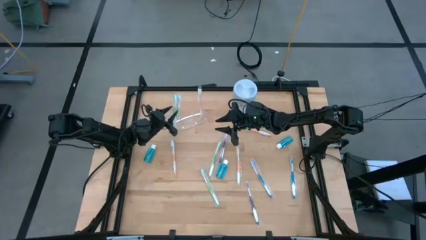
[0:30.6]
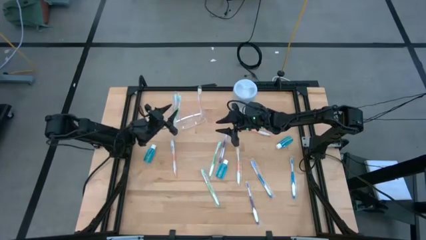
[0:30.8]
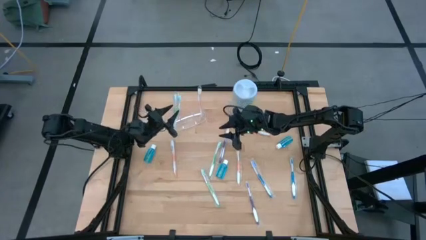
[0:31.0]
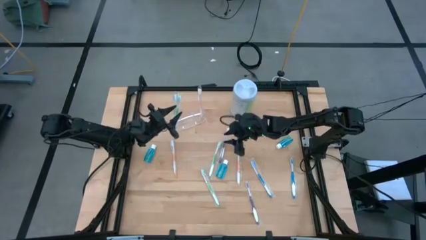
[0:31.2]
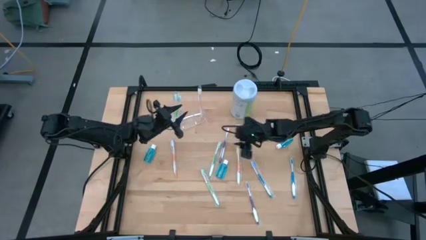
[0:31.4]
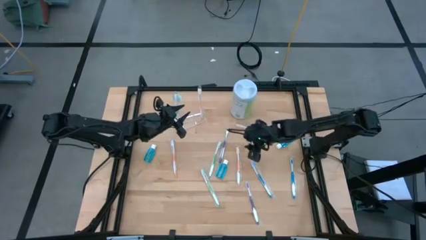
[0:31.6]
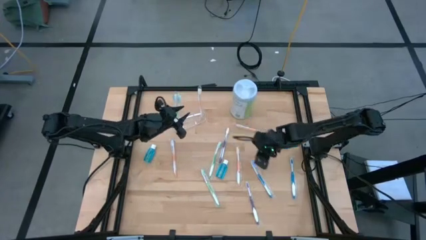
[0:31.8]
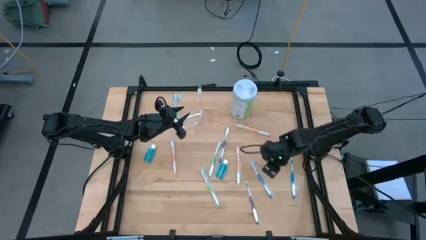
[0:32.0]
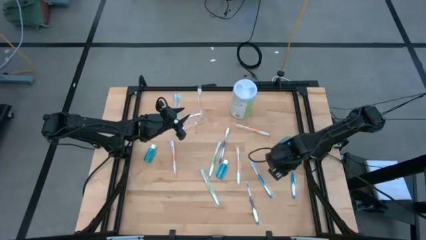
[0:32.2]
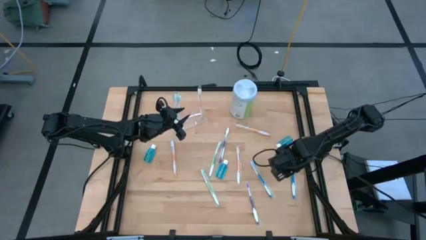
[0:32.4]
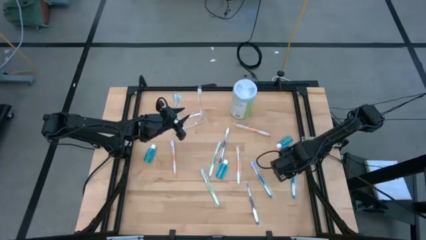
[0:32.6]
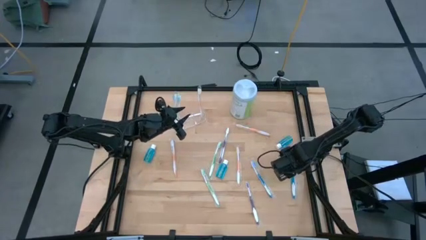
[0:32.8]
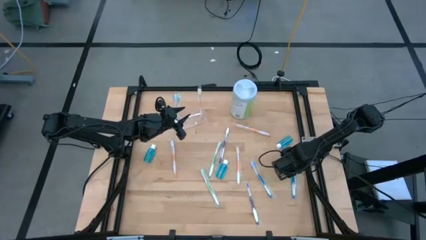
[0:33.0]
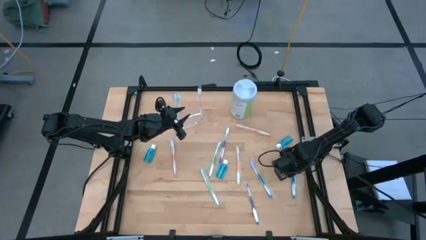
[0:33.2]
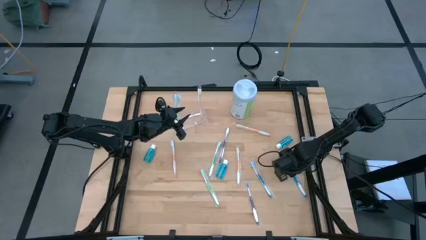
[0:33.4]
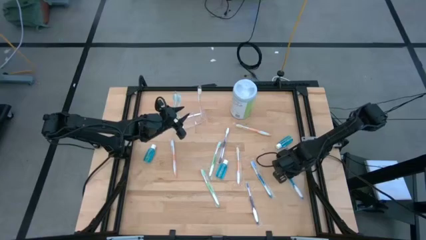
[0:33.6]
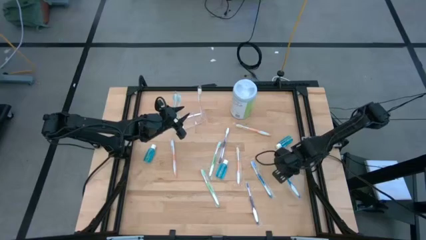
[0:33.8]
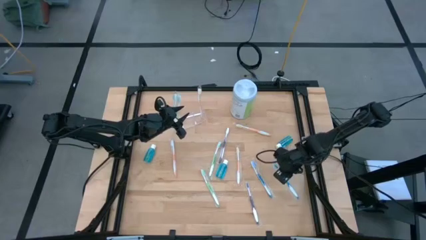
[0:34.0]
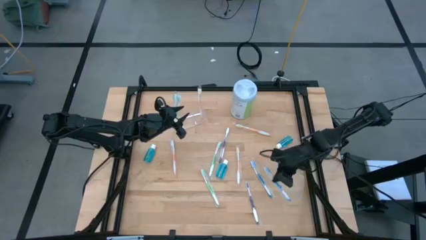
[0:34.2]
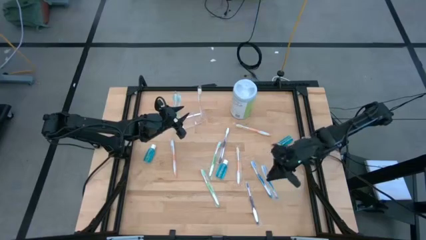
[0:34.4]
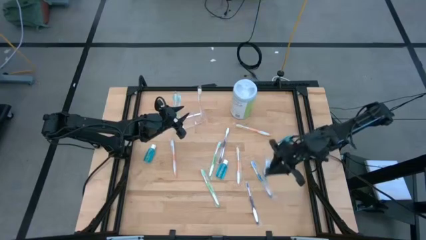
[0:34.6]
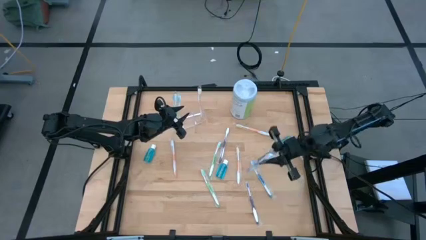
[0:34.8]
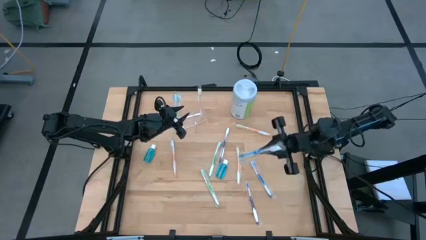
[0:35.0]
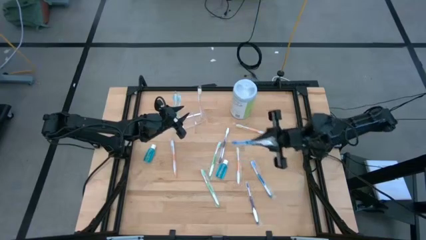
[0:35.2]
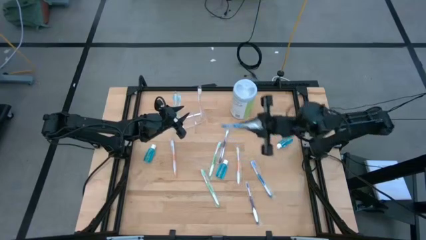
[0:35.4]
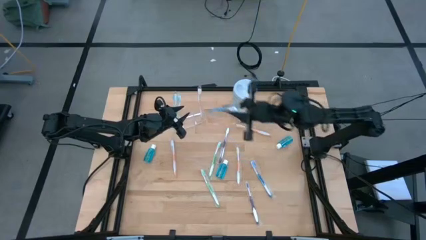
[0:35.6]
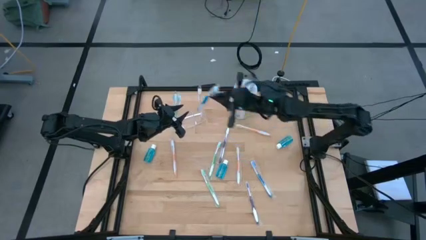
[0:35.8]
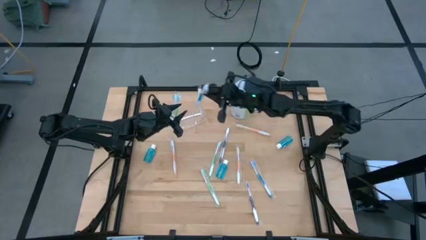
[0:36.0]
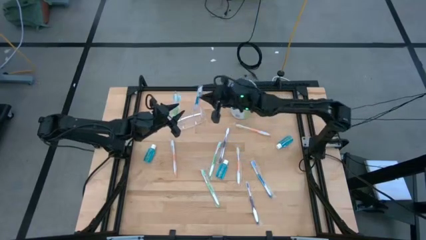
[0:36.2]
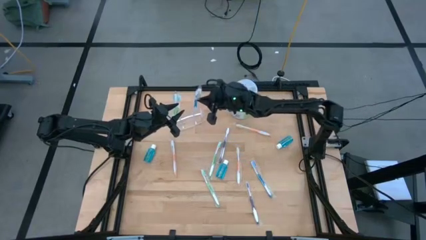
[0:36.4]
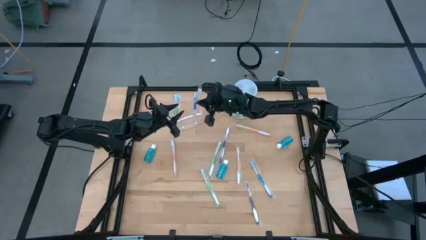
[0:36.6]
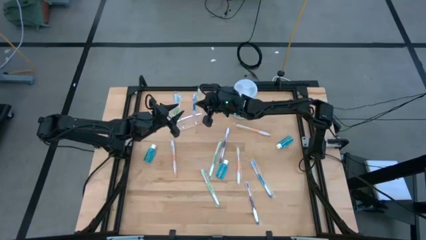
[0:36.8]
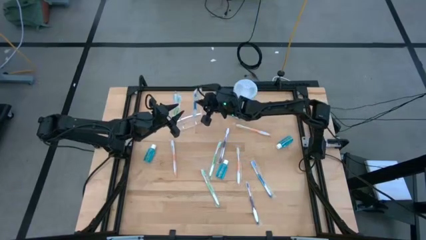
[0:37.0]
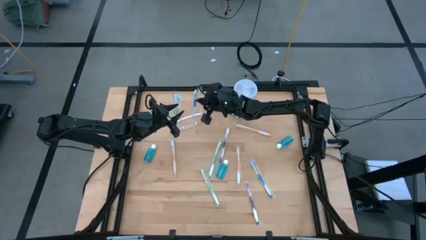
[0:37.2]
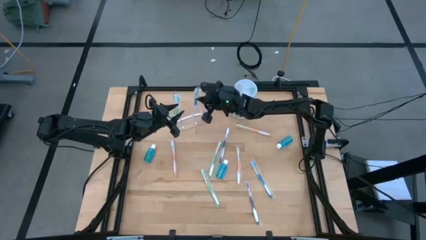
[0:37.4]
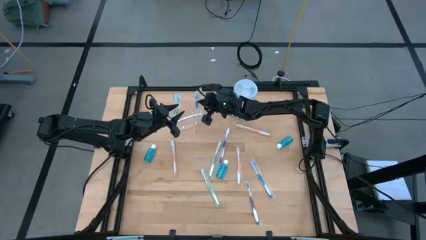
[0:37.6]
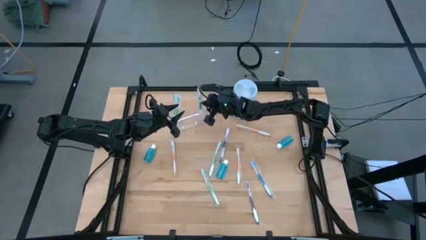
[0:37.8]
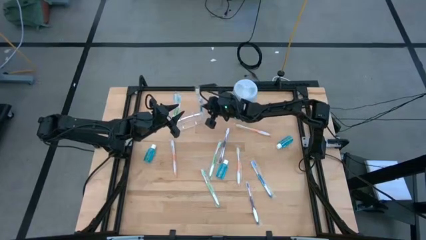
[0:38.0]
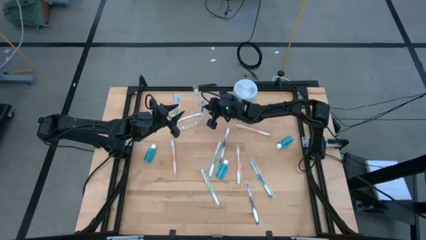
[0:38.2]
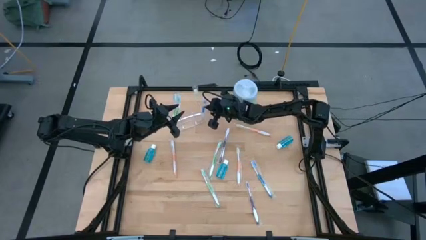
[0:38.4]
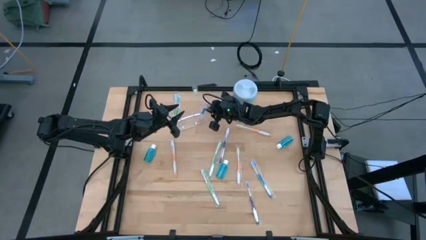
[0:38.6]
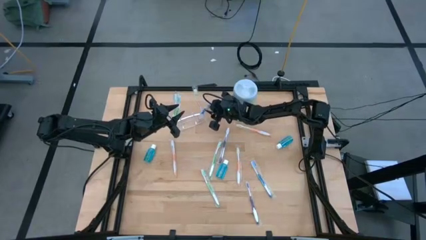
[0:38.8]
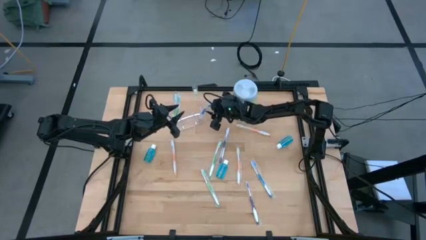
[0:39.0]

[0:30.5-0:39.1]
Task: Pick & Place toothbrushing station
Put the blue toothbrush into the transparent organizer

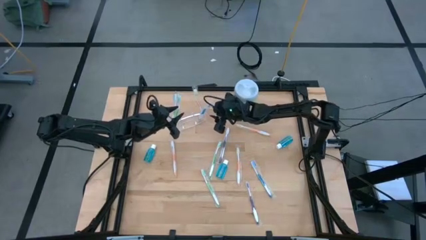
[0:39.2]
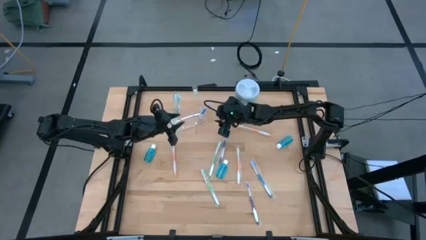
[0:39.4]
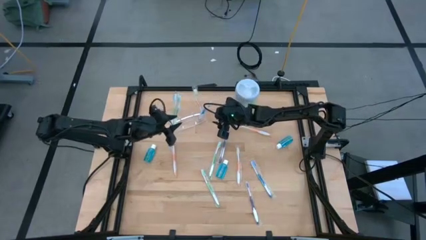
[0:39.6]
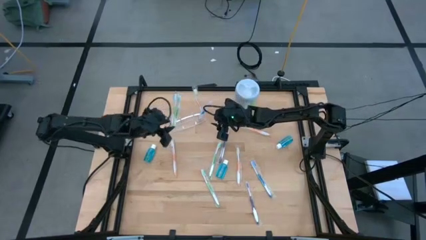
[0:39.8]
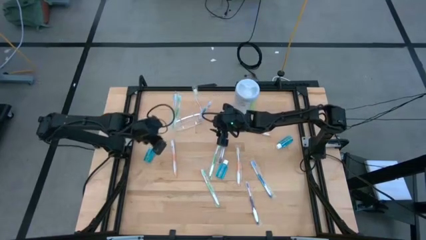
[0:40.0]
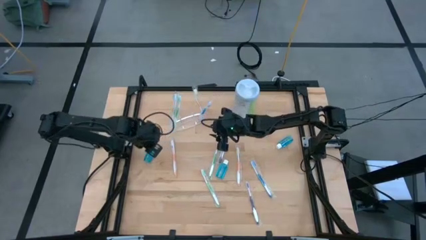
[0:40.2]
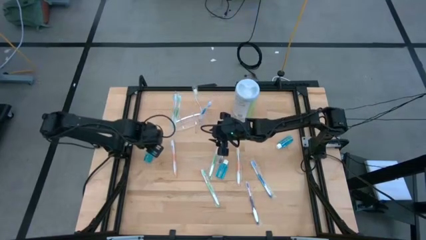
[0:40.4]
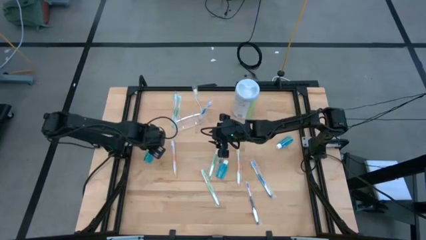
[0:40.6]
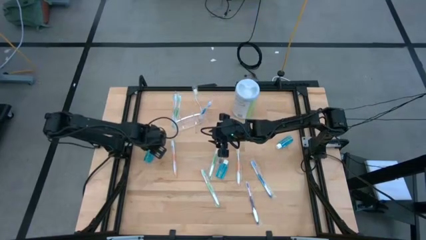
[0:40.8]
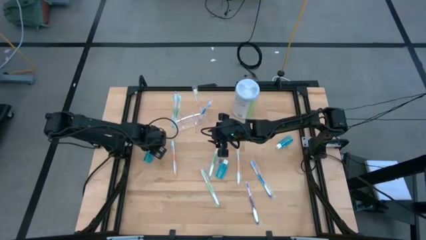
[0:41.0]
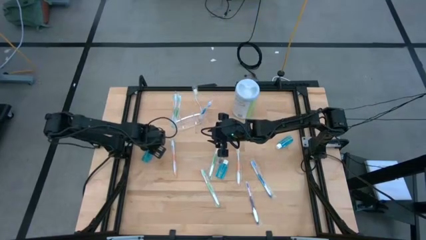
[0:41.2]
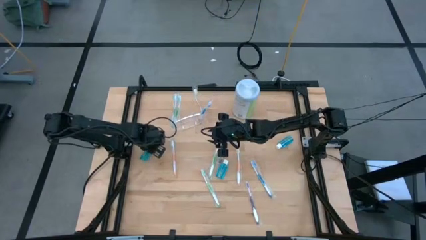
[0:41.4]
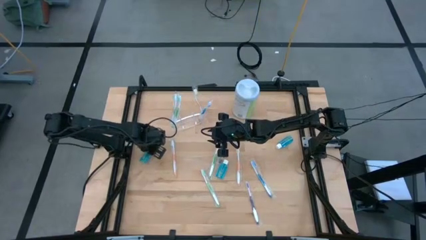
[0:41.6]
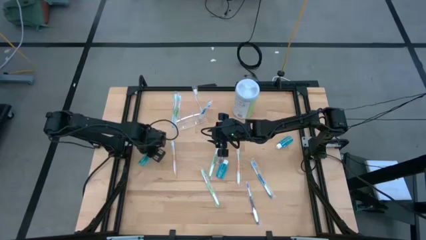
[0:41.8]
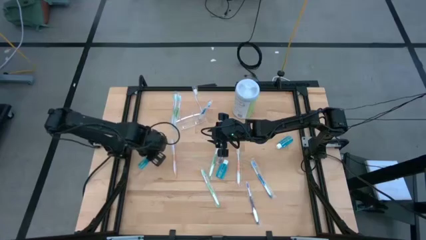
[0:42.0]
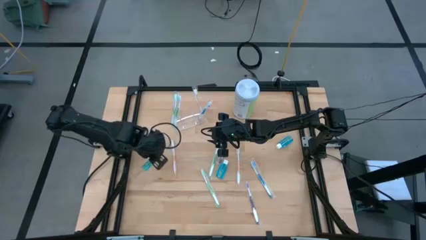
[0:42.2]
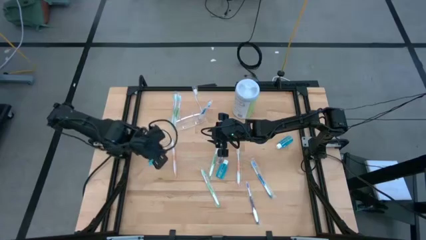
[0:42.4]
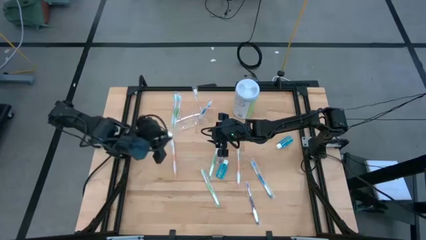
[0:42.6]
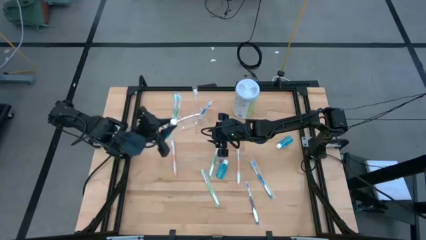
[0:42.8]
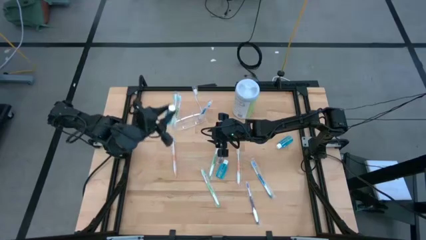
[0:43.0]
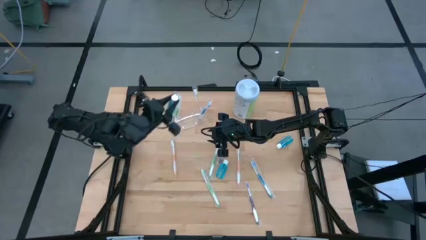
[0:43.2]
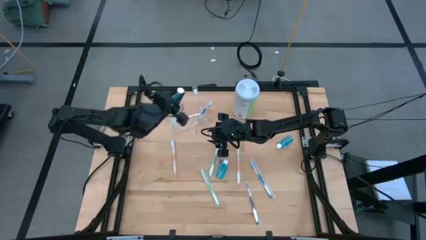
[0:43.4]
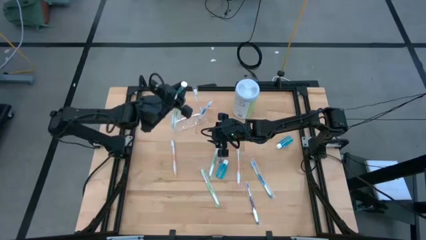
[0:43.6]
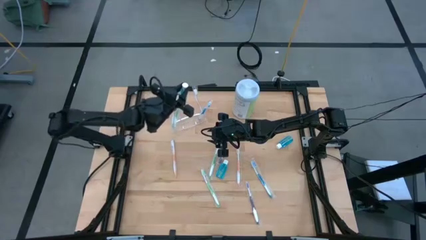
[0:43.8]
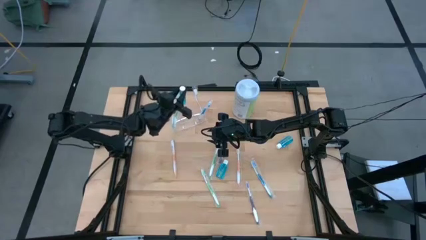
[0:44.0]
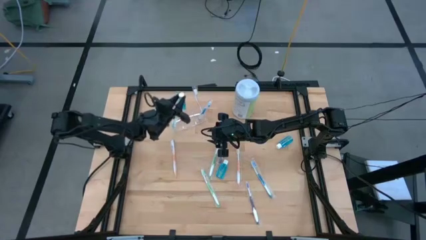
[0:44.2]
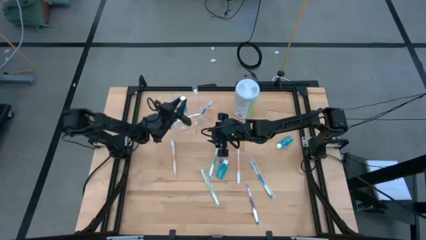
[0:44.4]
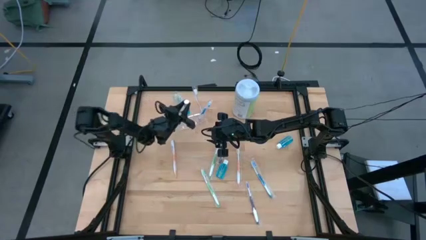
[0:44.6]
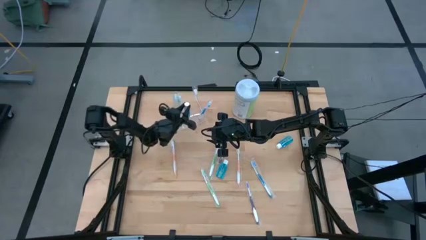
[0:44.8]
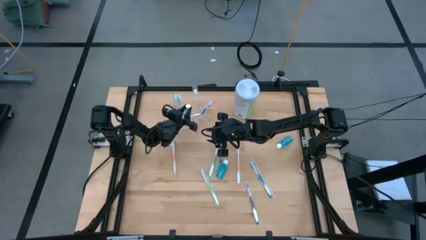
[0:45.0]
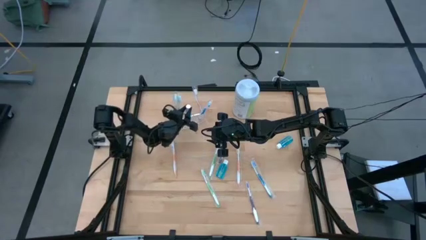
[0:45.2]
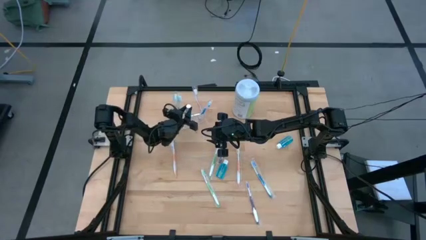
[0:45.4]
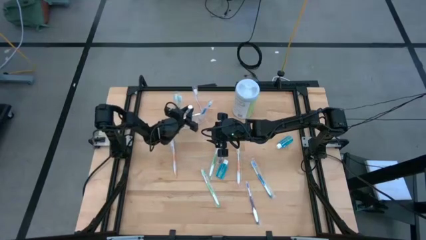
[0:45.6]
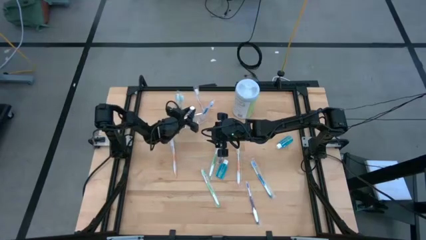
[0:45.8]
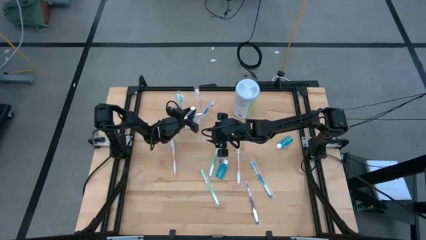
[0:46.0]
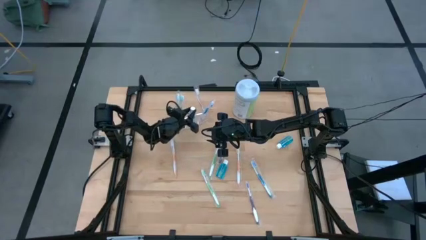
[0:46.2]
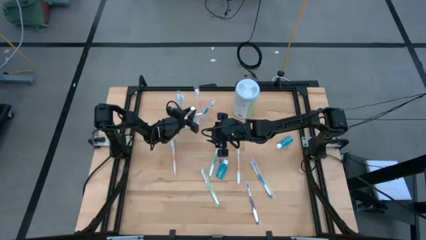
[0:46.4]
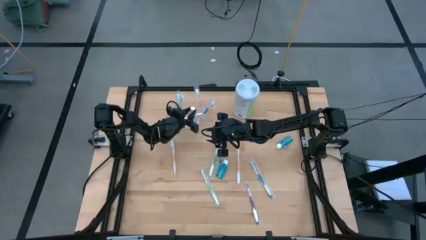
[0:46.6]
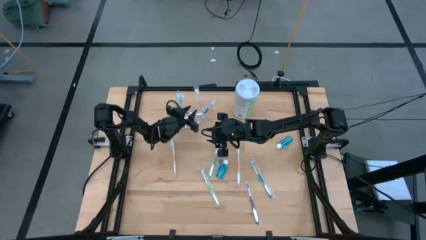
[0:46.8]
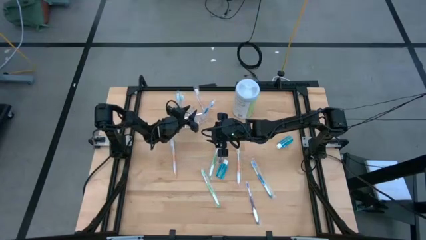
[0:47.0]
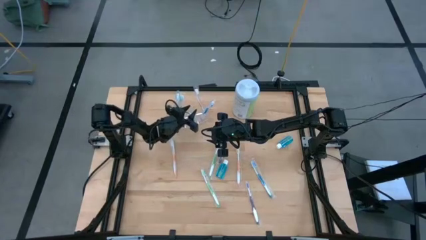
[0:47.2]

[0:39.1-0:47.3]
Put the mouthwash into the transparent organizer
